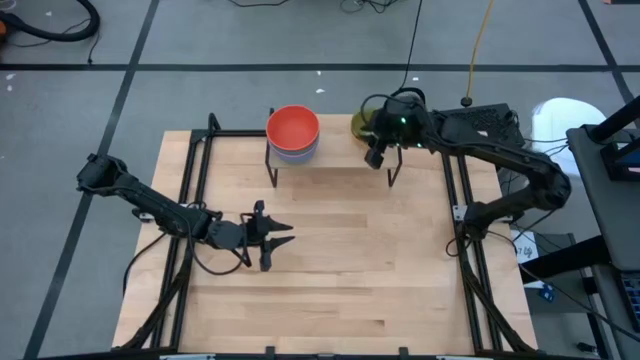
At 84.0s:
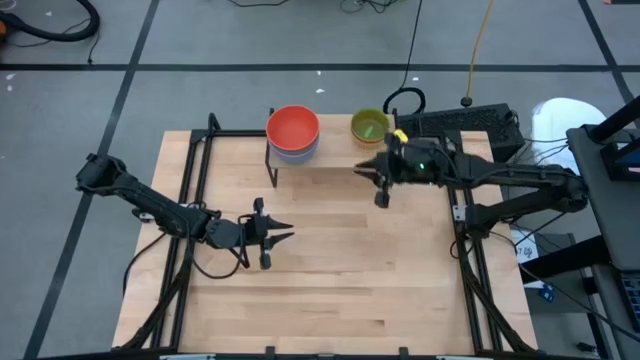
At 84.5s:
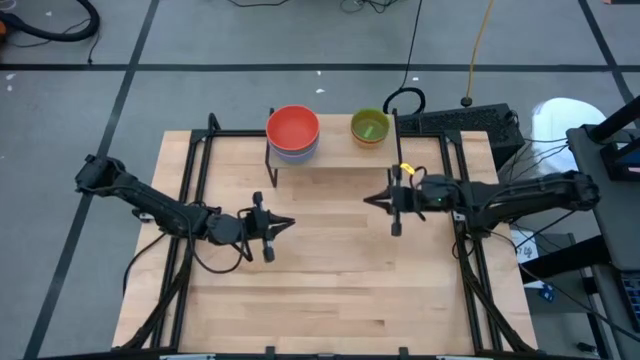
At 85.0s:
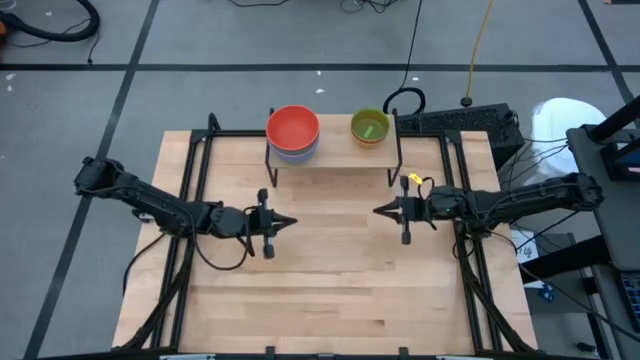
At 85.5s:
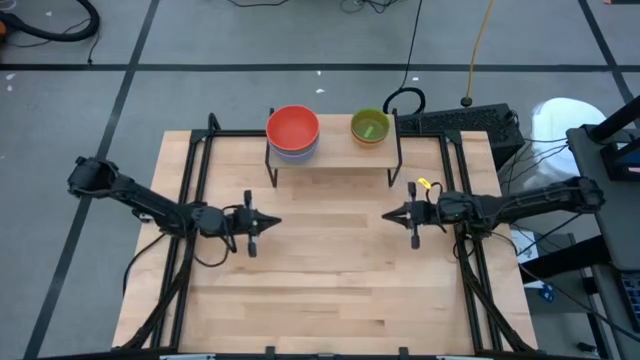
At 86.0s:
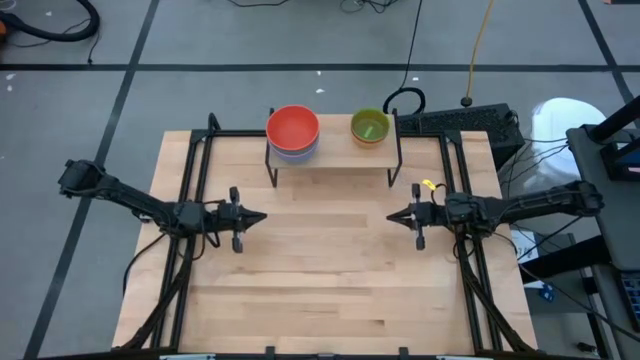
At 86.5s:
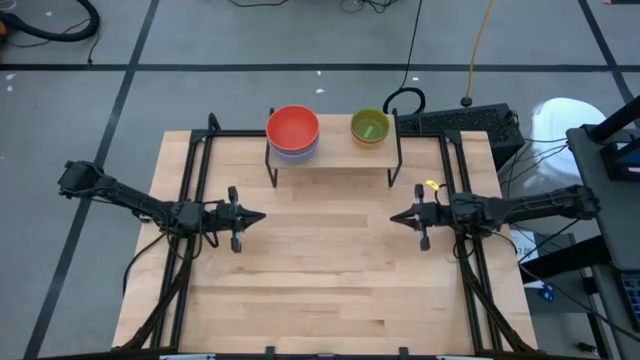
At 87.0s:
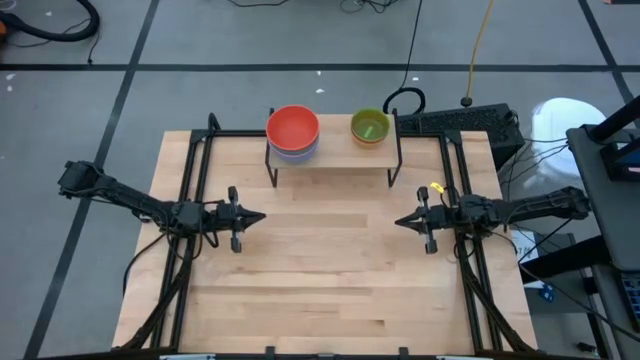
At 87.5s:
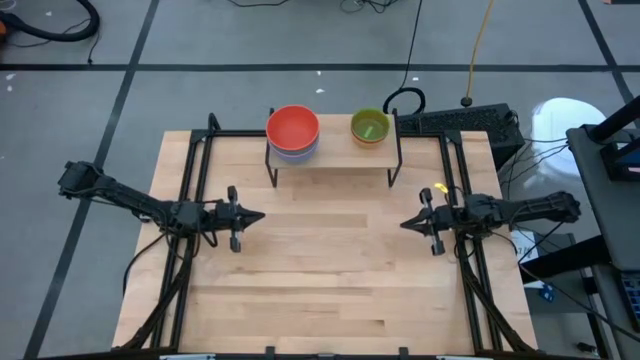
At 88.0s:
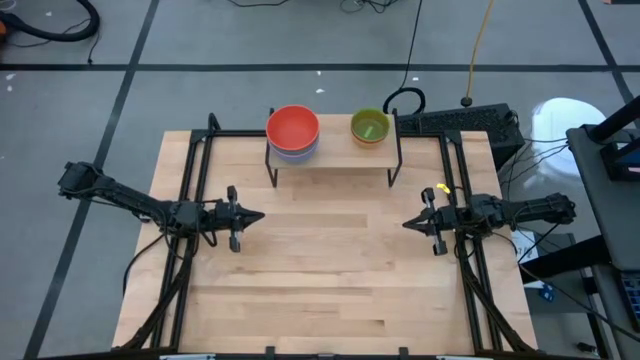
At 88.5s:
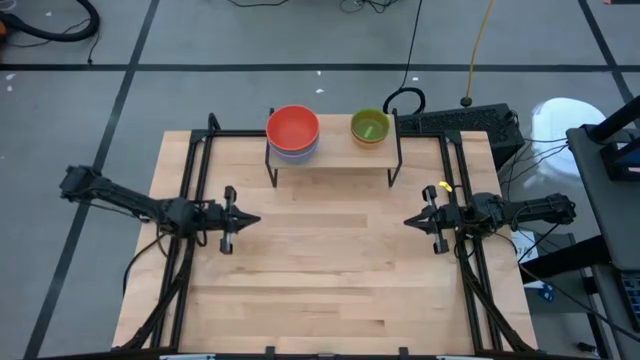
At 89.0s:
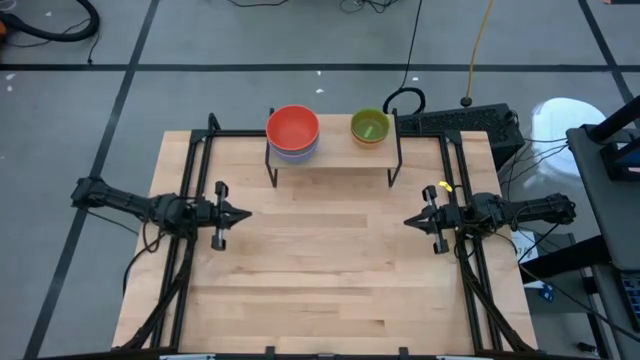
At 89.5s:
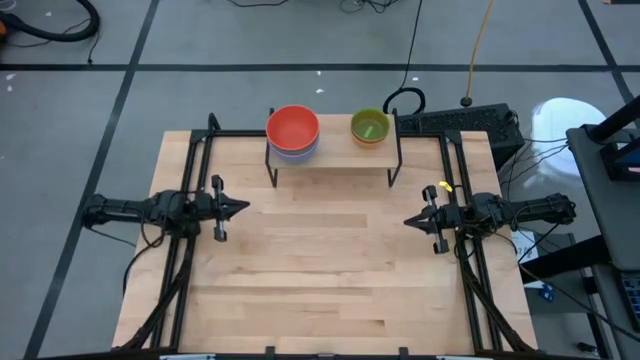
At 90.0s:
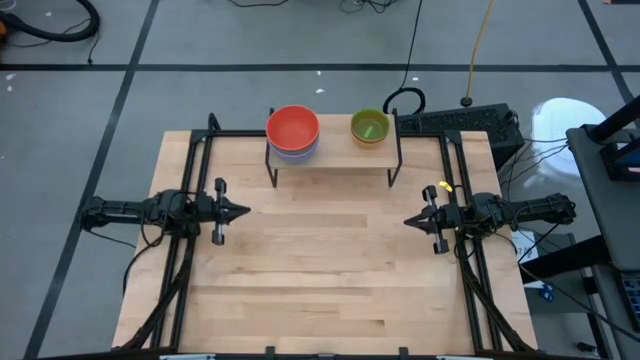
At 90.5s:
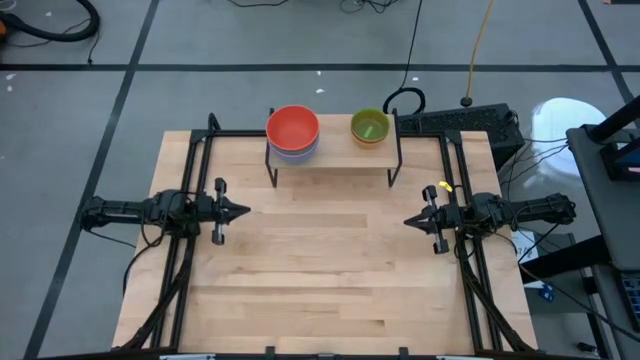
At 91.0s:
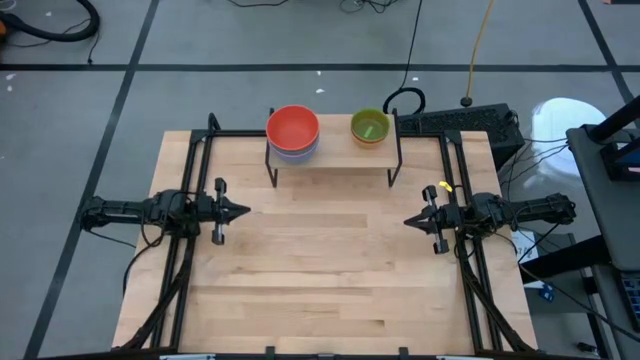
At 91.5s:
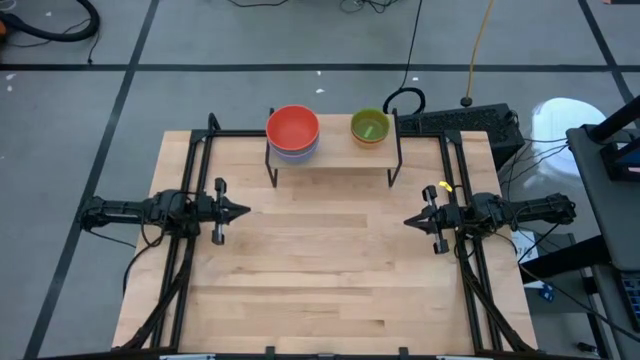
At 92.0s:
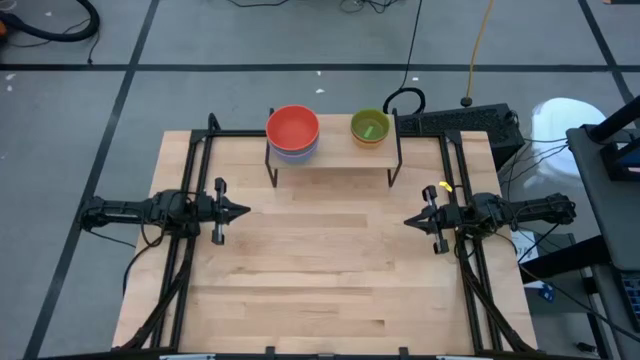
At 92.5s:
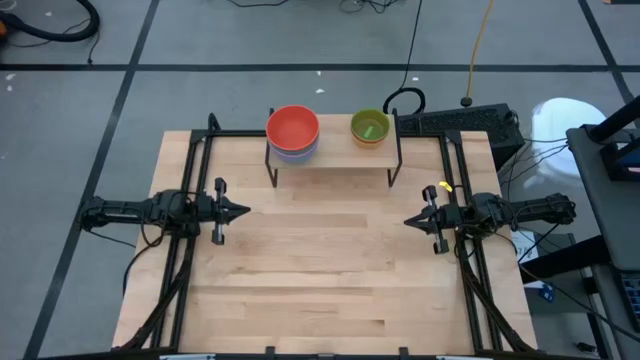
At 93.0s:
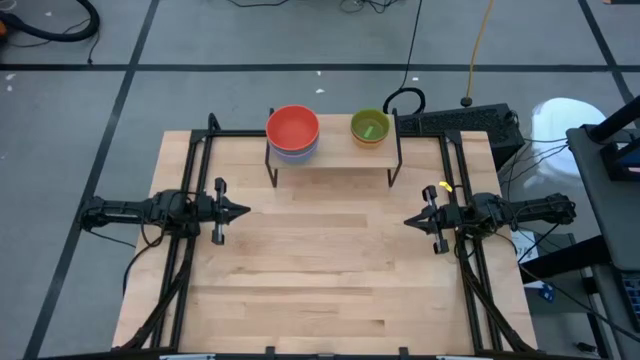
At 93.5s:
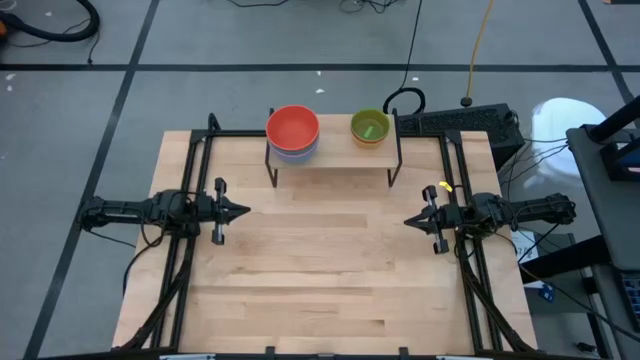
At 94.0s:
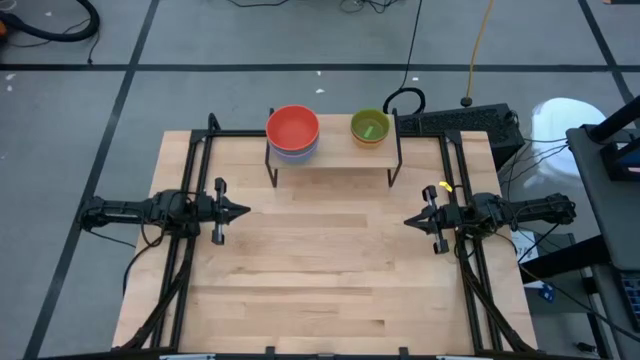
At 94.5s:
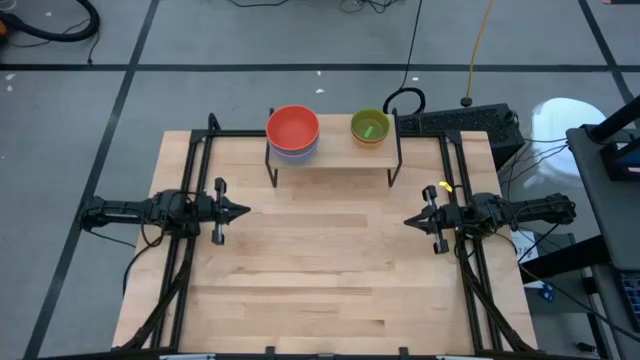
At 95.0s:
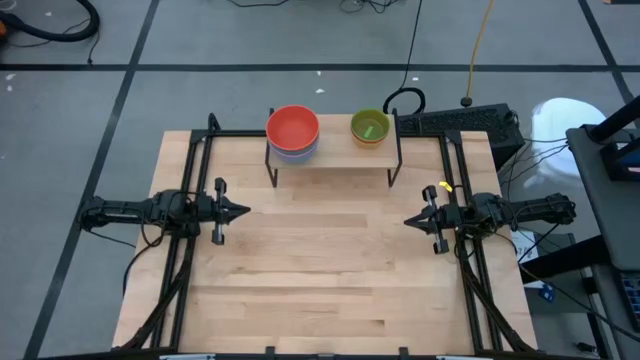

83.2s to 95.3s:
Task: Place and stack bowls onto a shelf
Return to Home Position

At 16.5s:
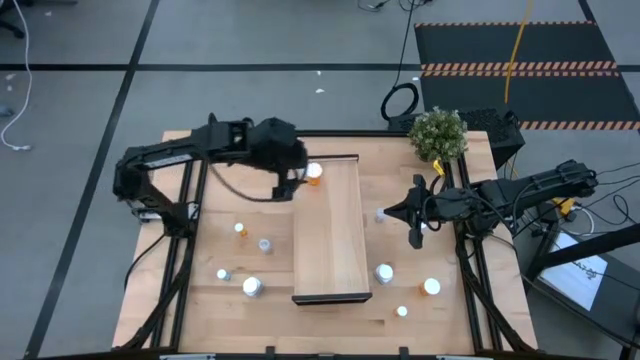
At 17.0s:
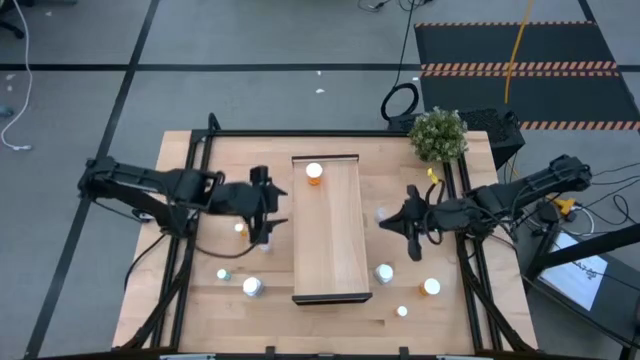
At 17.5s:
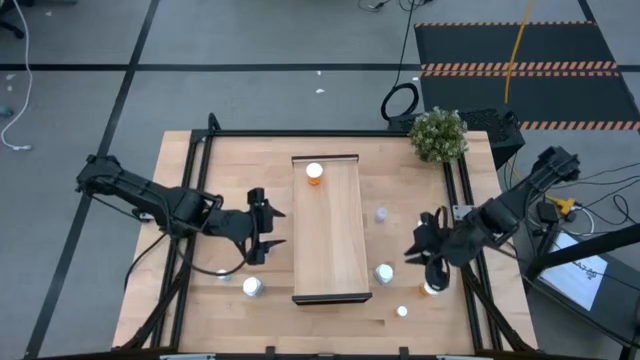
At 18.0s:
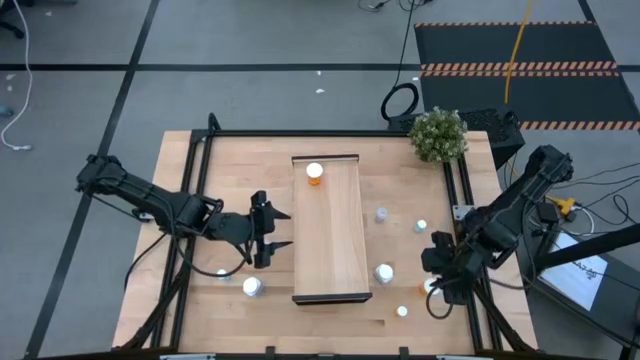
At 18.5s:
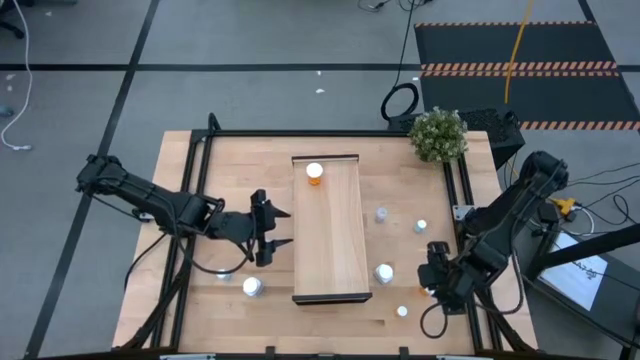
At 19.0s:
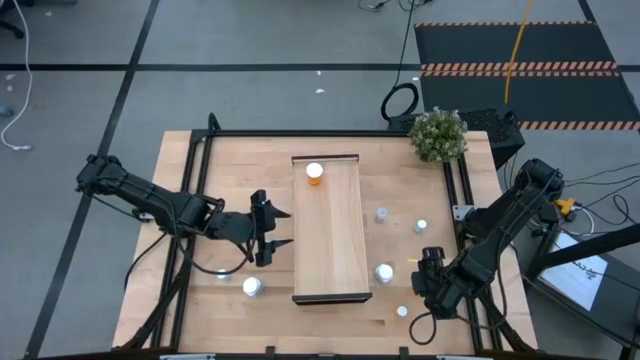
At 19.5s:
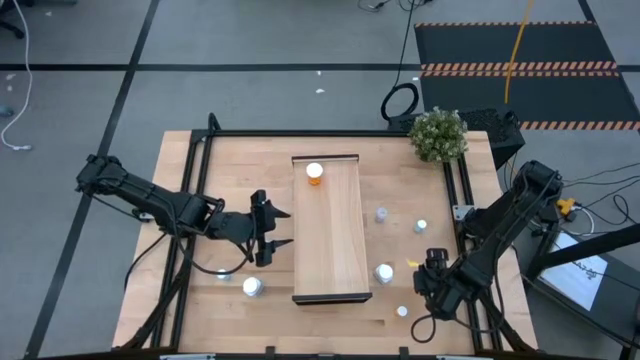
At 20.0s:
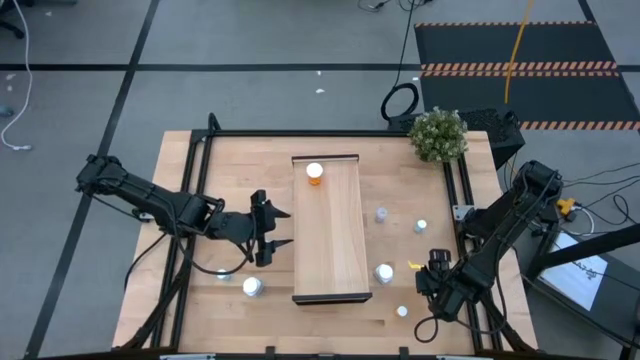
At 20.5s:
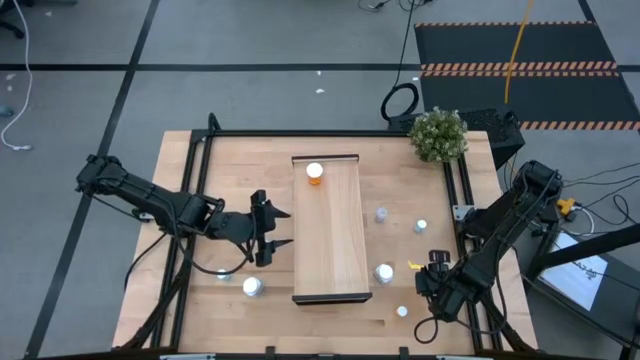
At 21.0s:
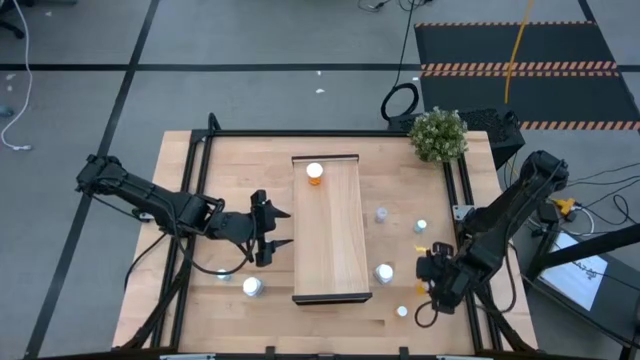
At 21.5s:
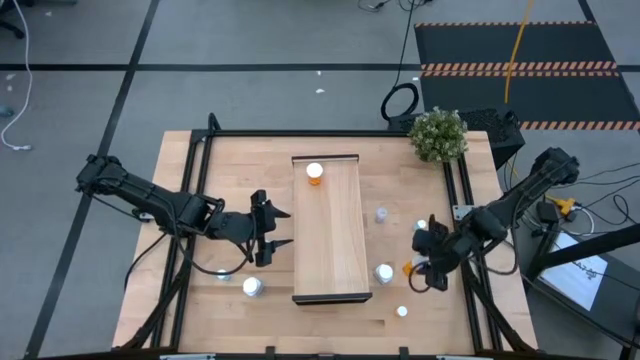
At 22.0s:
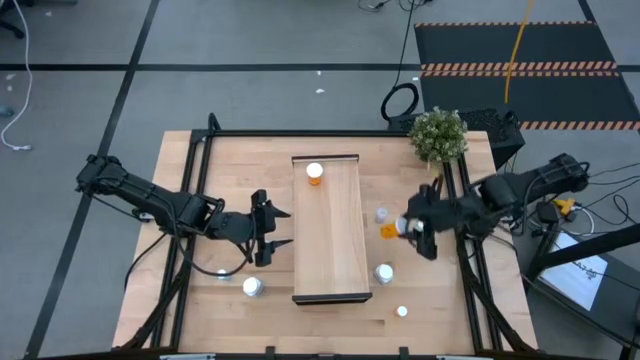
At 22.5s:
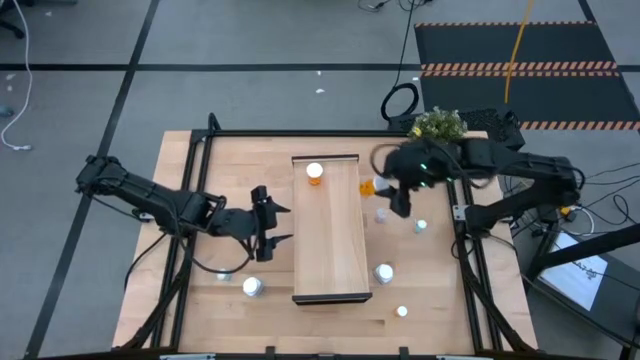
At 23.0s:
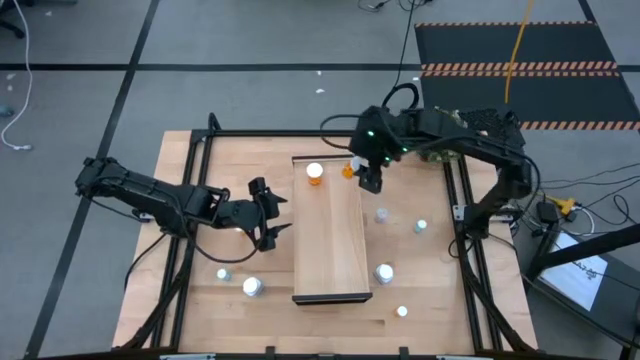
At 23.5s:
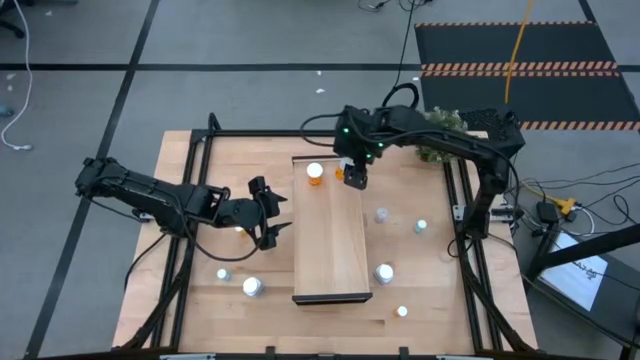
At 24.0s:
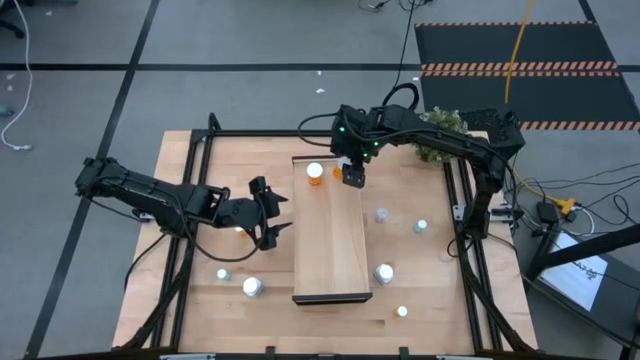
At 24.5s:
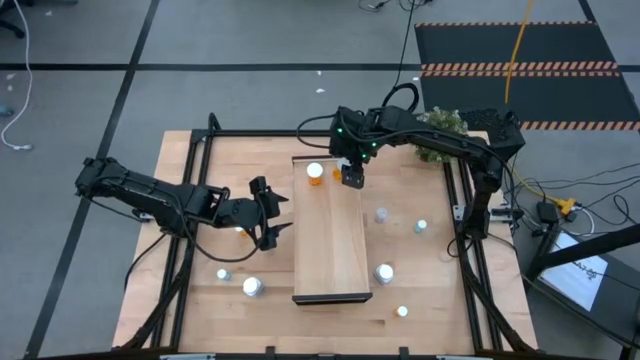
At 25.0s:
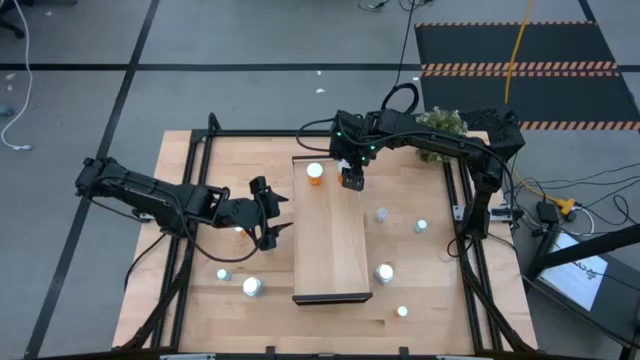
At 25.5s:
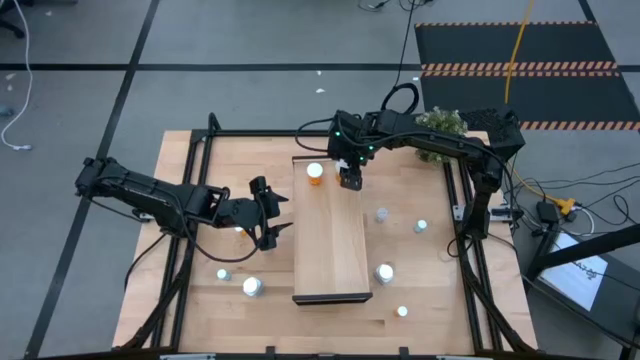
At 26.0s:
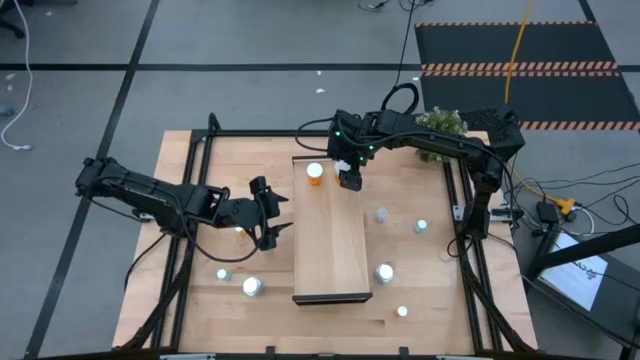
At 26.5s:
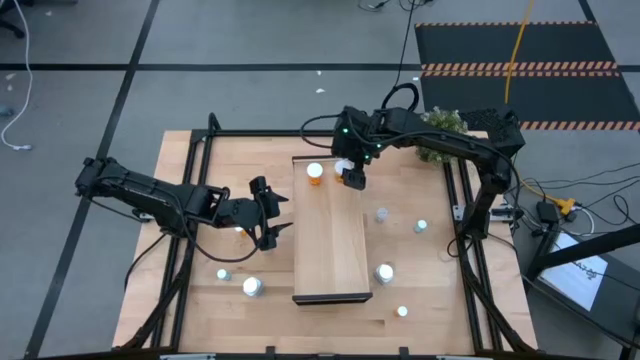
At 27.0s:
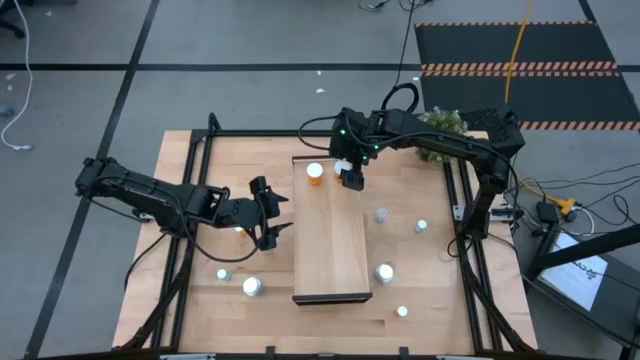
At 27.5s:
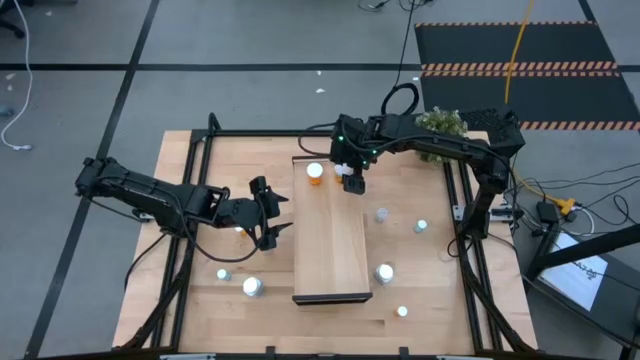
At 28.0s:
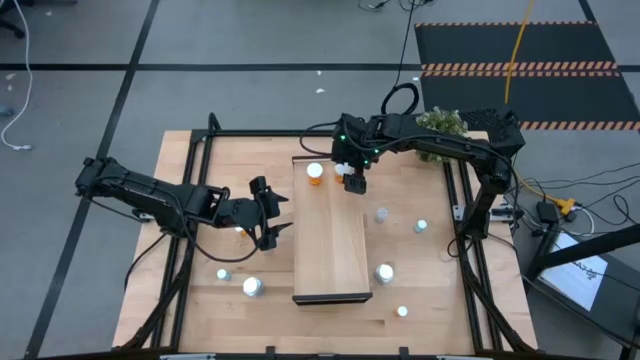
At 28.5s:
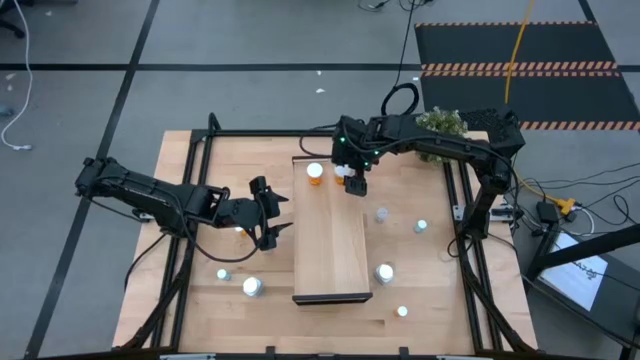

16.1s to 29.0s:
Task: Pick and place medicine bottles onto shelf by color
Put the large orange pill bottle on the shelf aligned with the other large orange pill bottle
